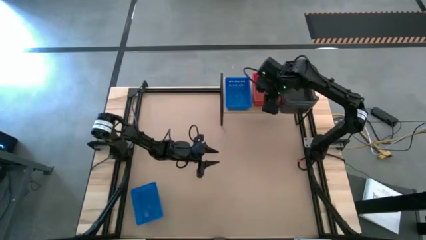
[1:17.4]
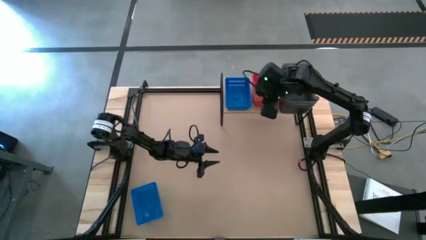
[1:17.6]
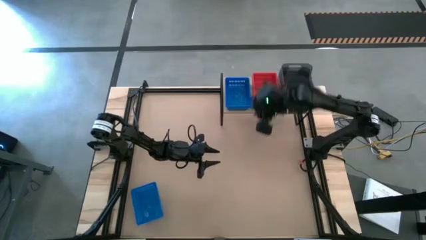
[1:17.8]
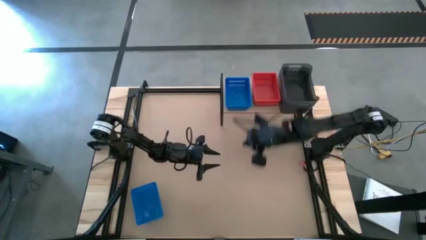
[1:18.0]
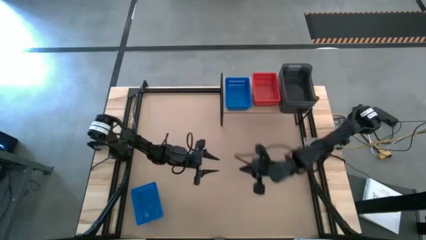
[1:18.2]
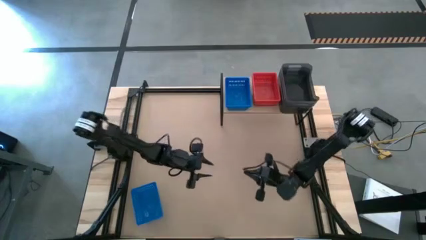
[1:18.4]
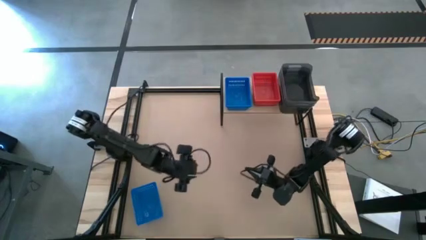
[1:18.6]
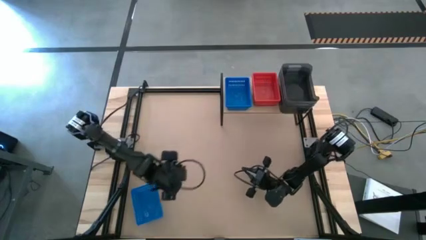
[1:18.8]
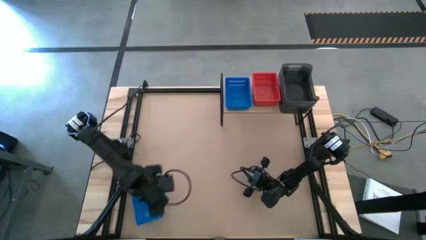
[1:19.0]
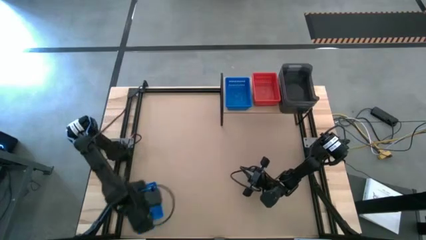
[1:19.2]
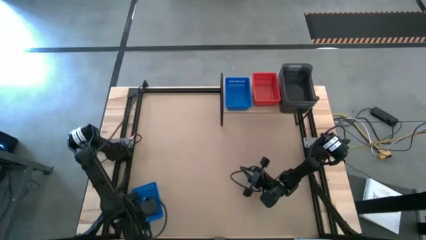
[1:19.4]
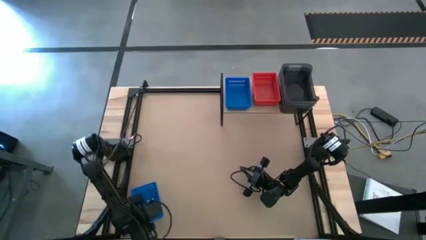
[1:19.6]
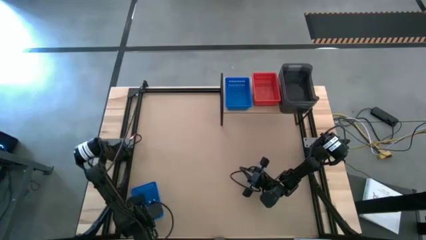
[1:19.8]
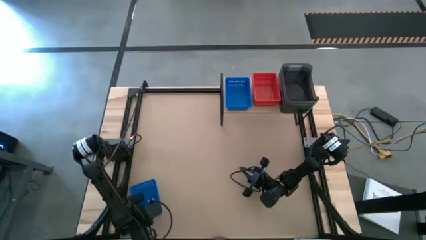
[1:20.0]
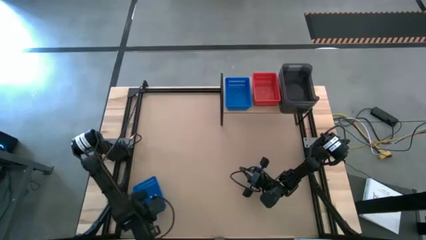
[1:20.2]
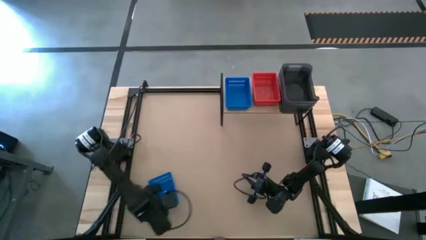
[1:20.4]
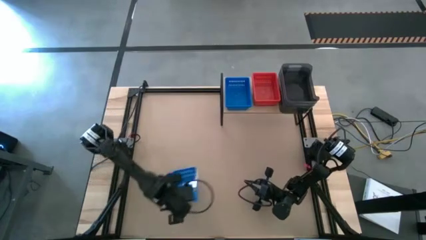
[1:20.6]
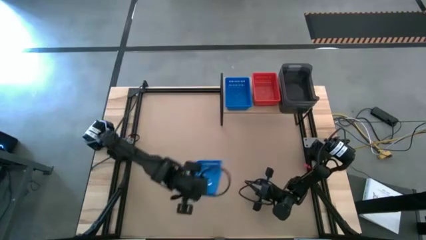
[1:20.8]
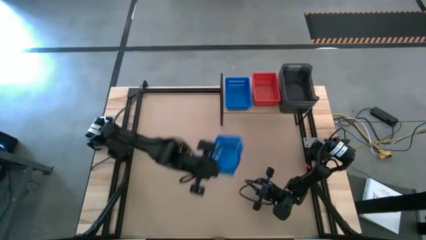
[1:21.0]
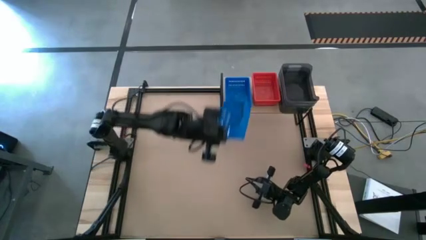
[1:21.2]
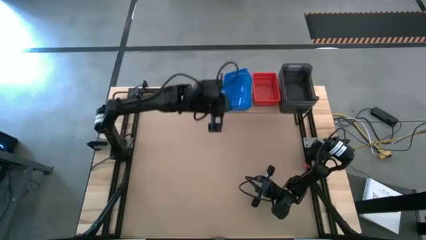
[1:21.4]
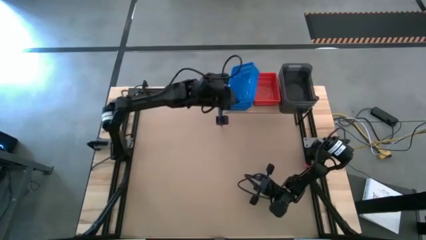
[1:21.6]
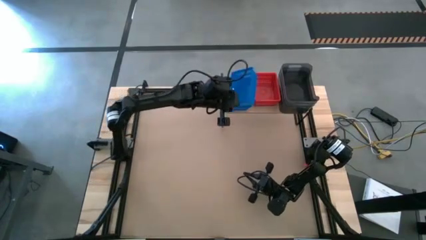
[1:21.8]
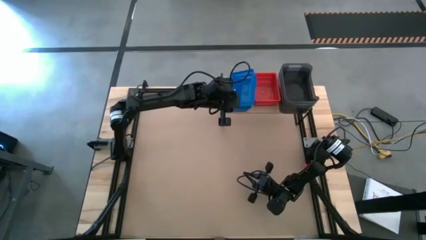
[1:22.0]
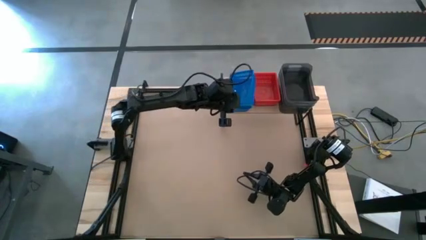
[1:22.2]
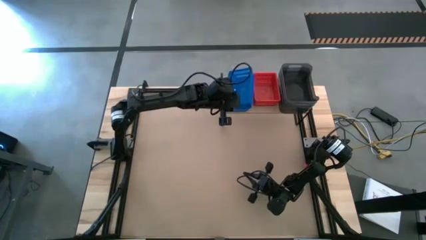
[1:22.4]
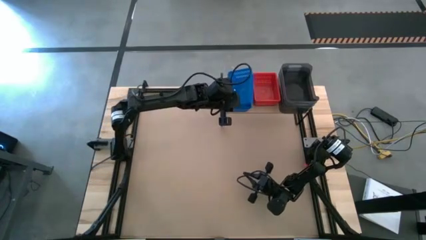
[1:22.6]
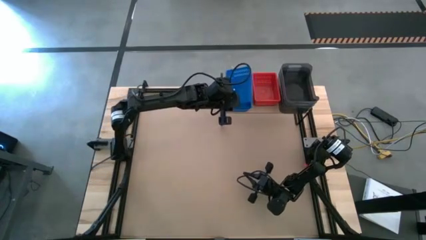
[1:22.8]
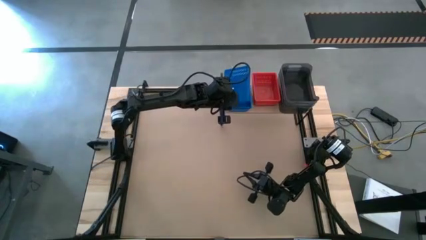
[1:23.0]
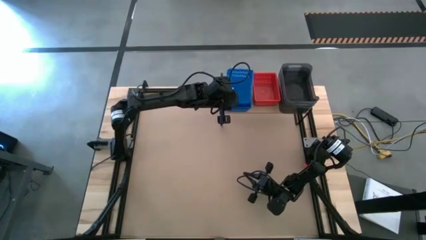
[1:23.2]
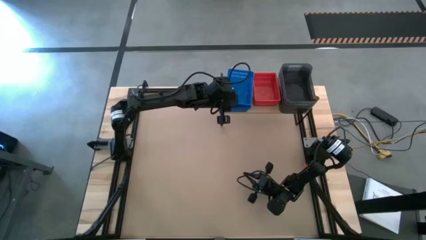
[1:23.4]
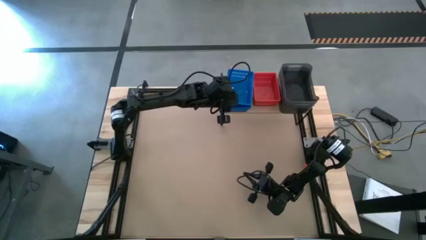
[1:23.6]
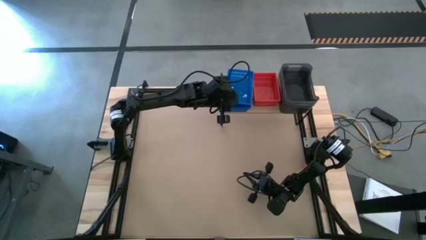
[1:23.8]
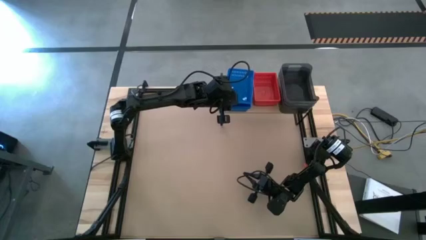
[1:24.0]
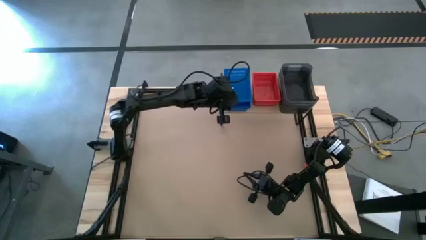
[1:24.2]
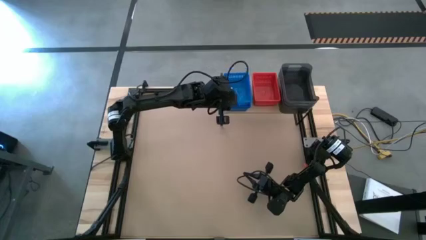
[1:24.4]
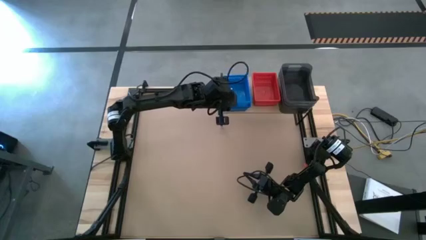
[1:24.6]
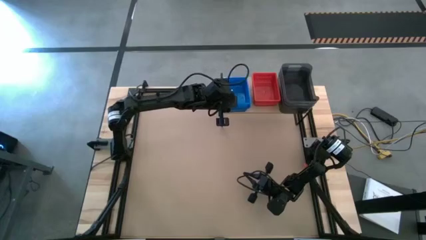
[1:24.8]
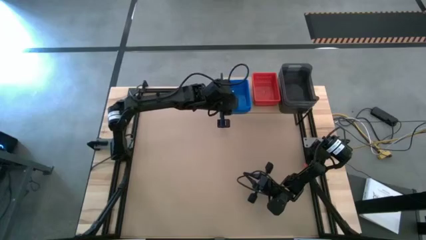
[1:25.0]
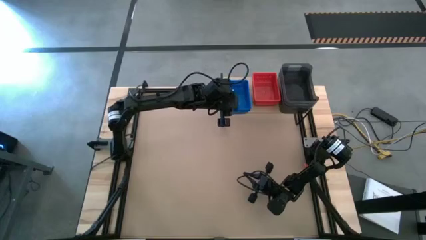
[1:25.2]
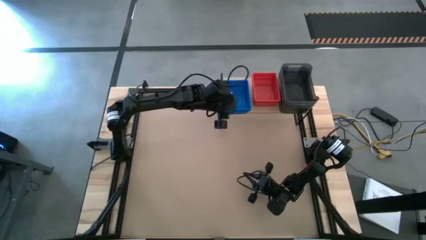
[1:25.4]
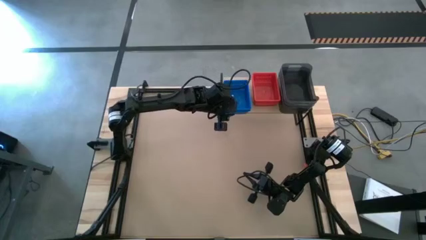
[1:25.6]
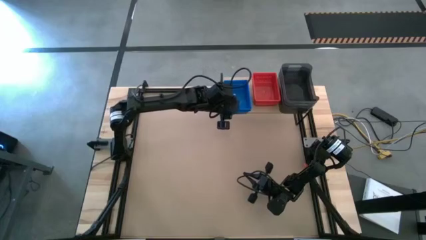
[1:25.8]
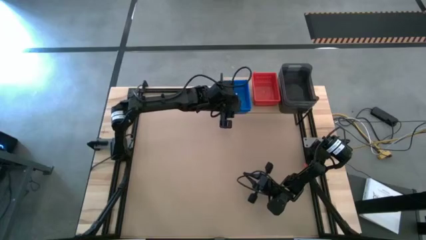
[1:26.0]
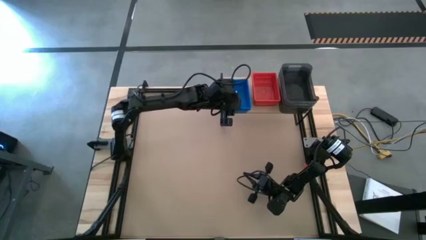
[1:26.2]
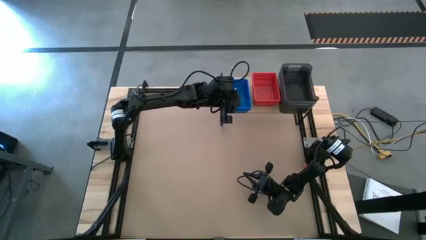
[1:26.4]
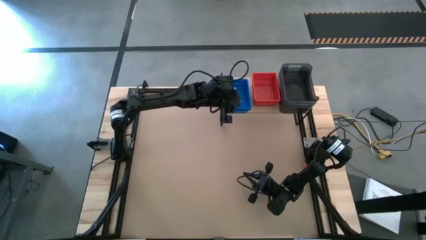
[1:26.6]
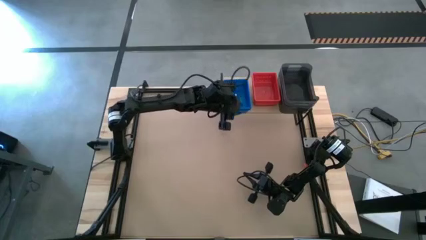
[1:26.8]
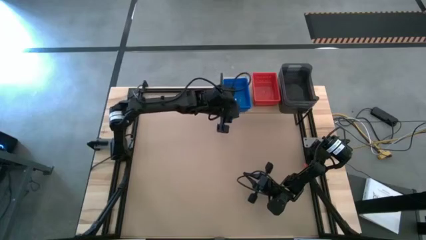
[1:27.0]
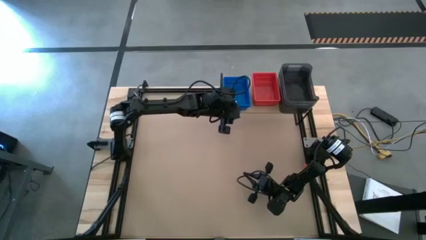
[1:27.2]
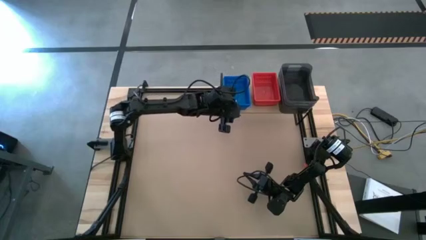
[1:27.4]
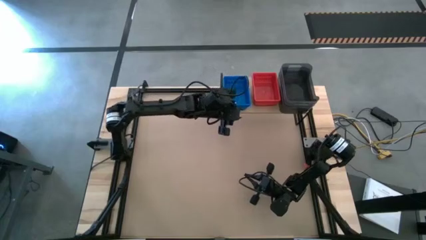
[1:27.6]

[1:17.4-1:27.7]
Task: Stack baskets on shelf by color
Stack the blue bin on the other blue bin on the shelf

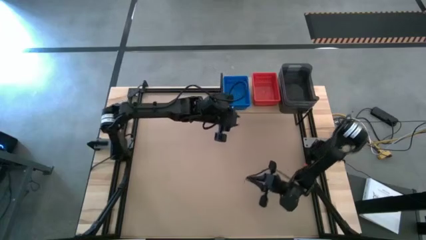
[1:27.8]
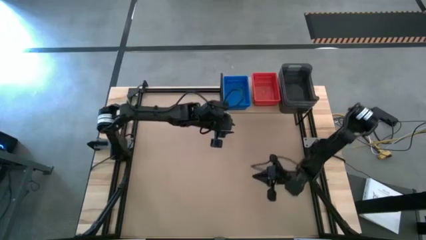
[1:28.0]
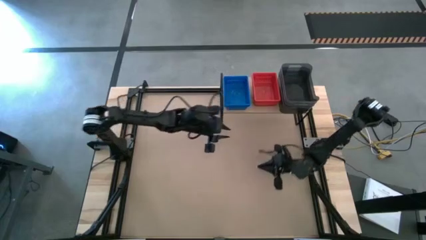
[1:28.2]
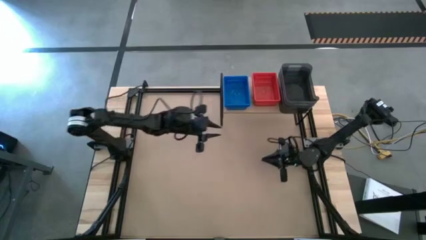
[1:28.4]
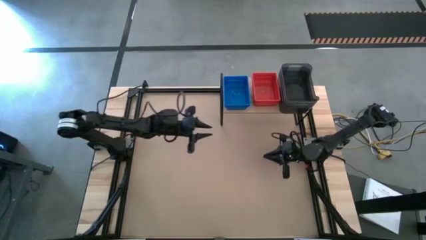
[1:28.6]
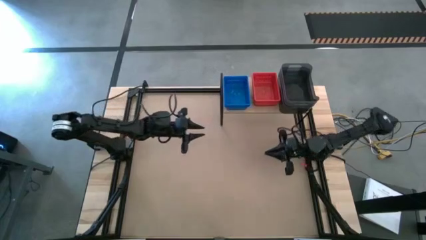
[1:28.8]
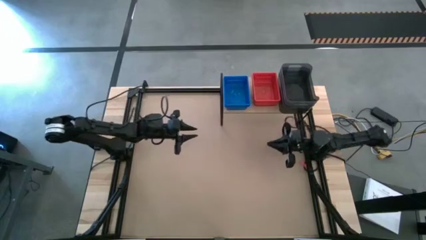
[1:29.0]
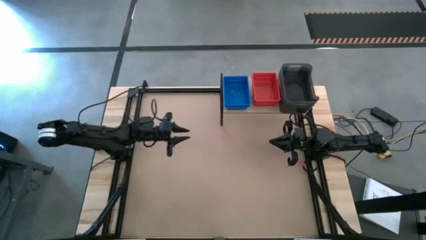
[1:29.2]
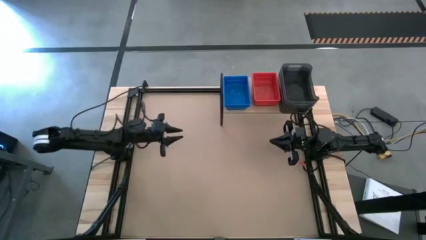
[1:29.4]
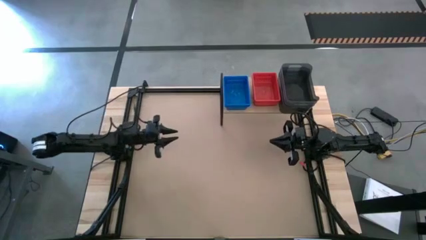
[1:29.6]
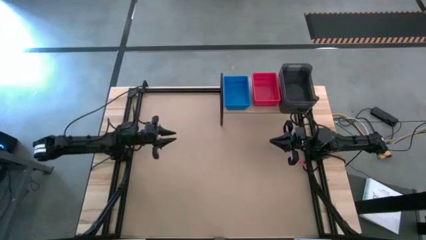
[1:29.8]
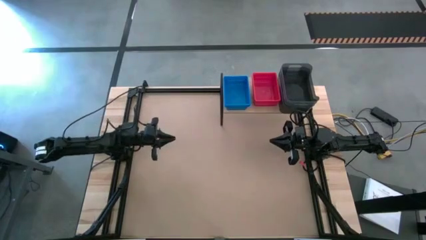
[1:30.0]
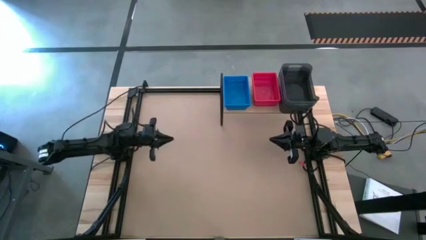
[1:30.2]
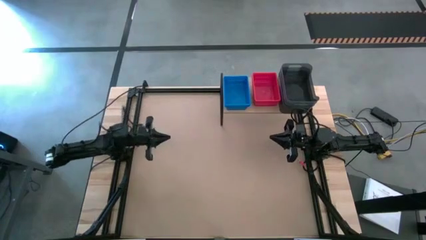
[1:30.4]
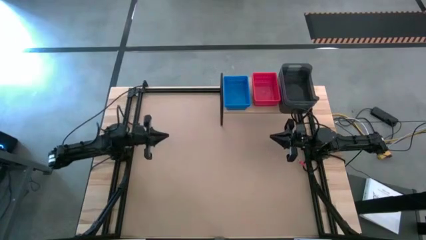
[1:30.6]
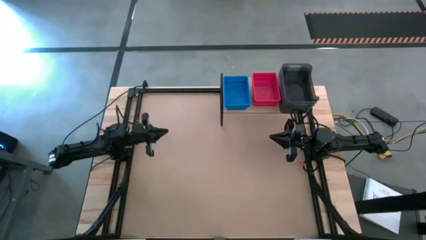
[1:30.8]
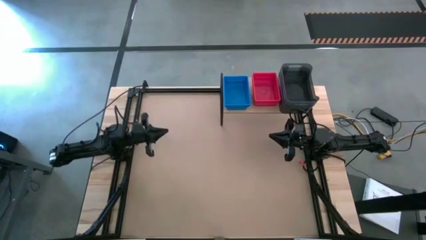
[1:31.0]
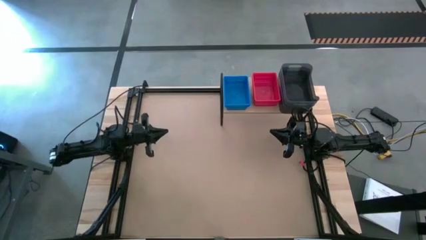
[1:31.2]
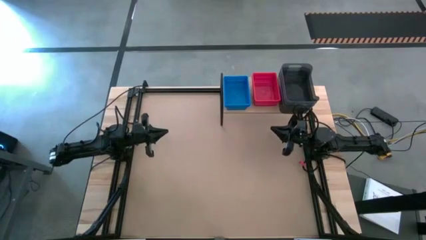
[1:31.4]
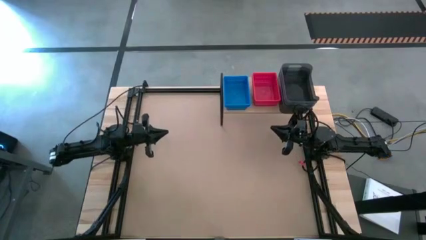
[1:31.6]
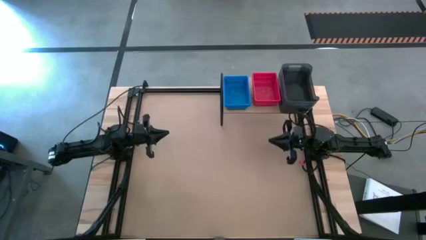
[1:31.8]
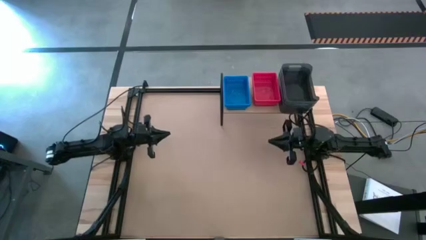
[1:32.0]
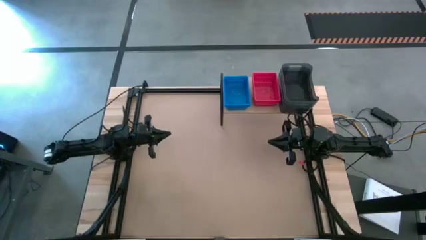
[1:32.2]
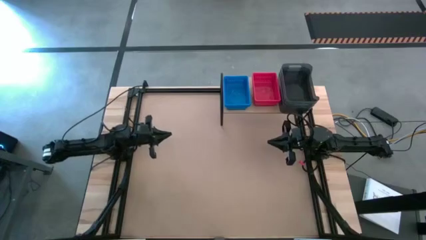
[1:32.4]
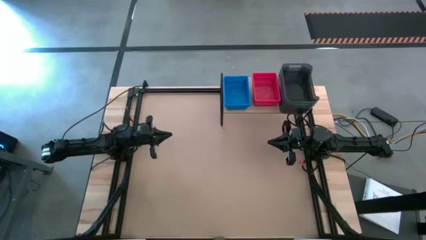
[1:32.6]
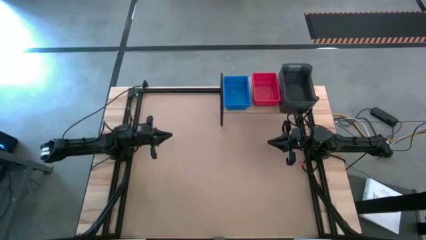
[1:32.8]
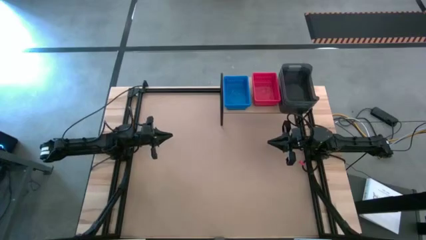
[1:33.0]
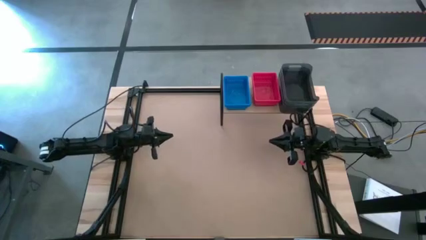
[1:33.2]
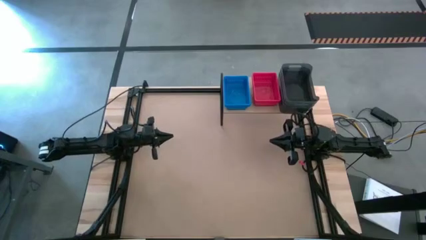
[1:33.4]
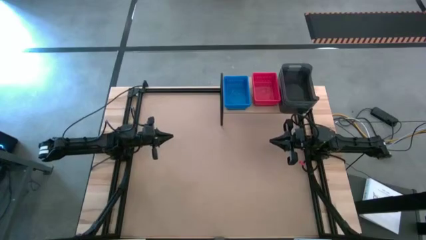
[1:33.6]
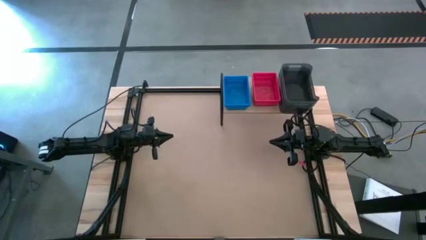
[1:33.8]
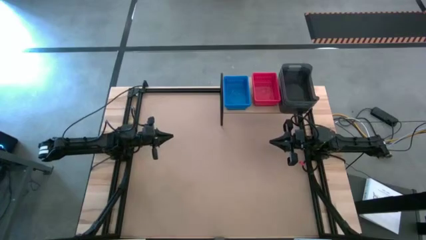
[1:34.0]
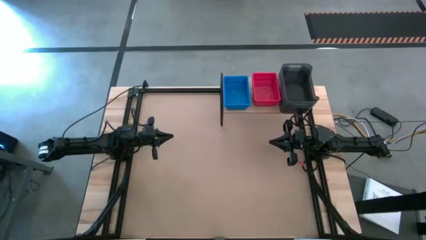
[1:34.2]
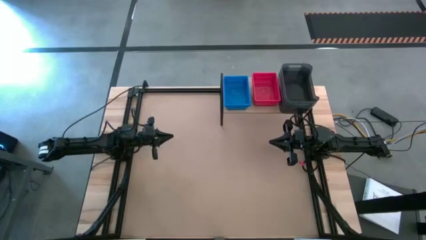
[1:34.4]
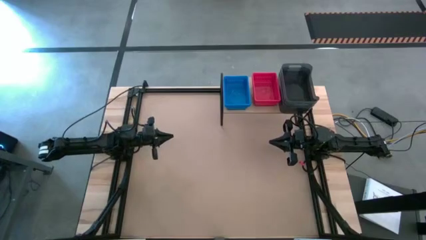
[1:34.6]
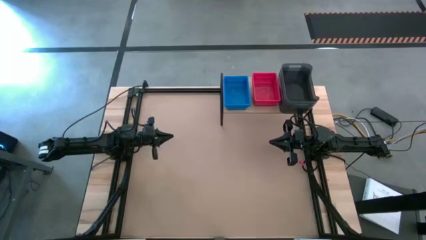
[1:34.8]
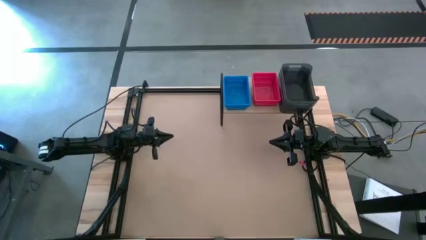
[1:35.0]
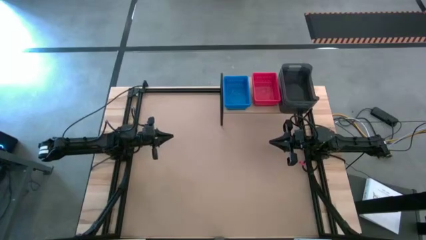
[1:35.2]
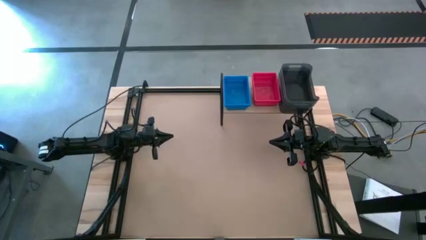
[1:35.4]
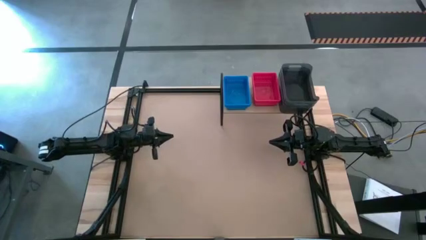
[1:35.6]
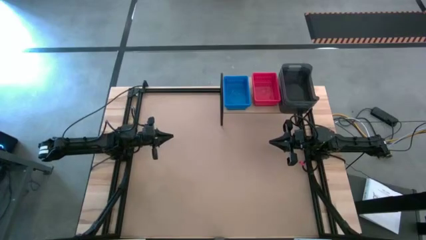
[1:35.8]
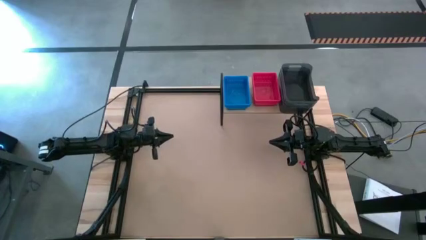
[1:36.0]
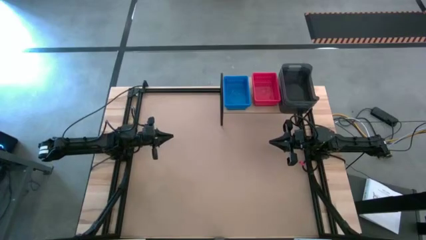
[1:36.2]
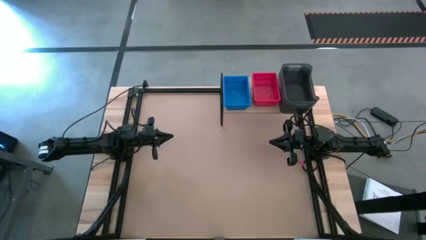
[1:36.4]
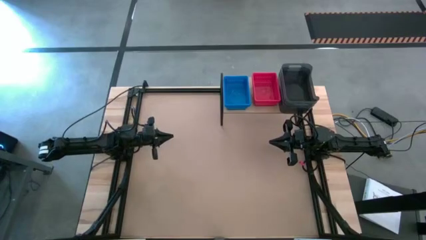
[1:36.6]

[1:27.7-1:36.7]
Return to Home Position
